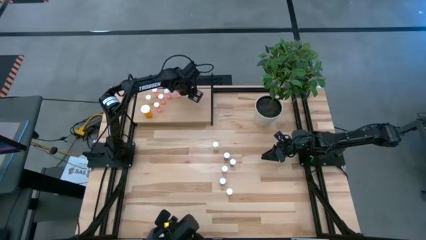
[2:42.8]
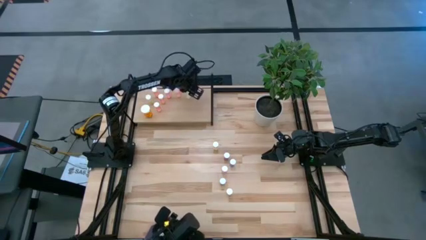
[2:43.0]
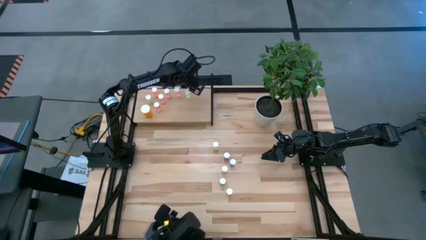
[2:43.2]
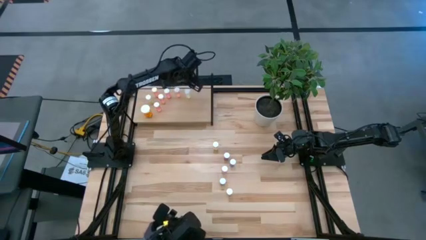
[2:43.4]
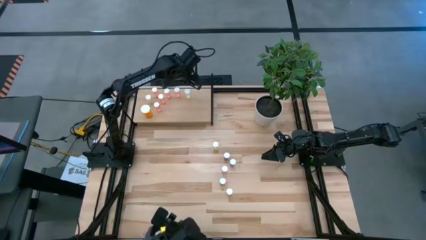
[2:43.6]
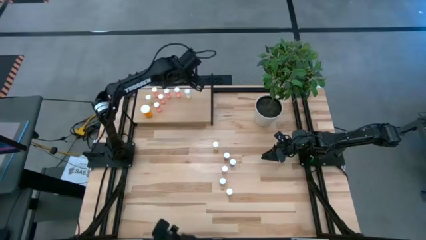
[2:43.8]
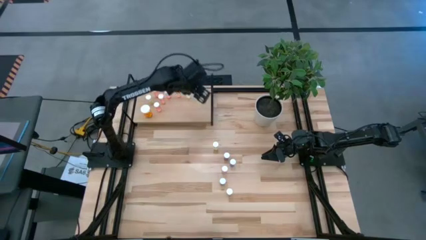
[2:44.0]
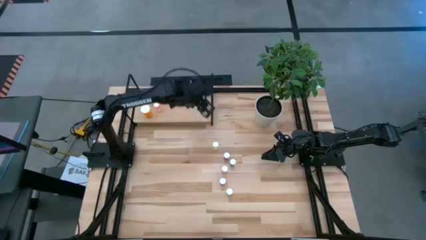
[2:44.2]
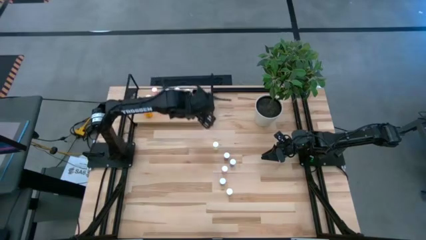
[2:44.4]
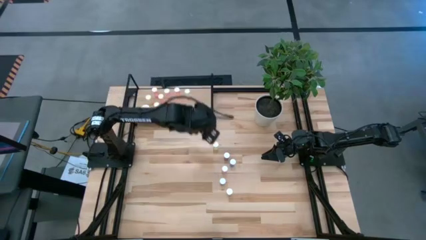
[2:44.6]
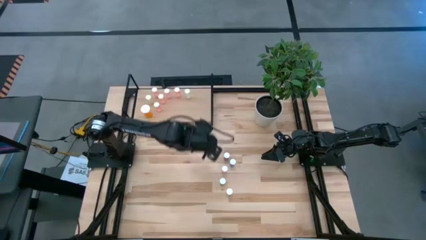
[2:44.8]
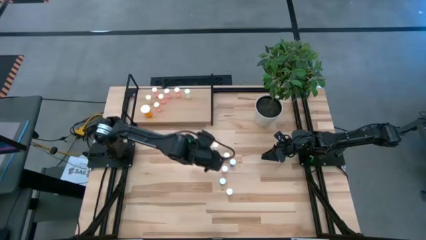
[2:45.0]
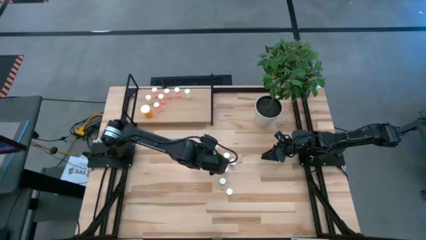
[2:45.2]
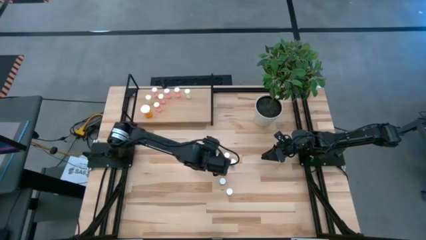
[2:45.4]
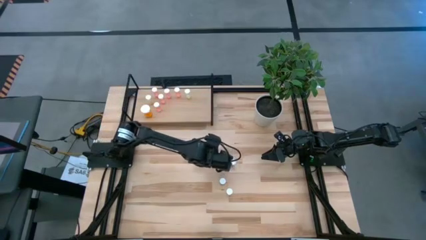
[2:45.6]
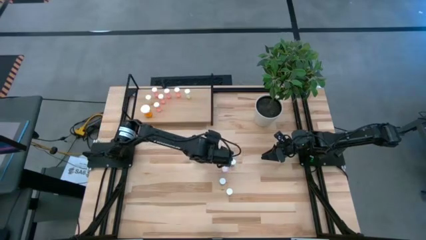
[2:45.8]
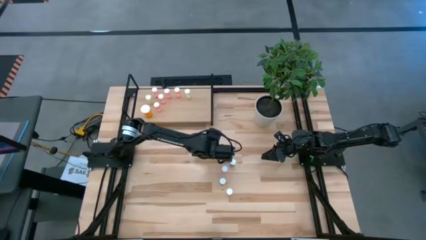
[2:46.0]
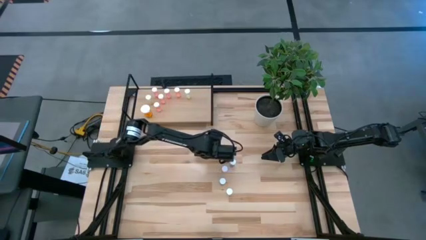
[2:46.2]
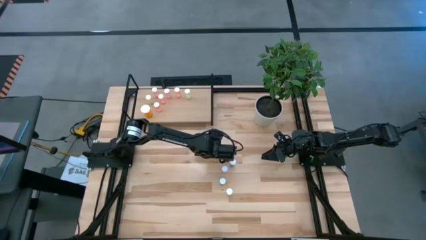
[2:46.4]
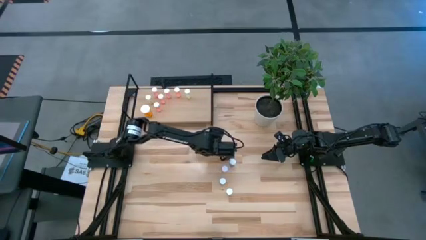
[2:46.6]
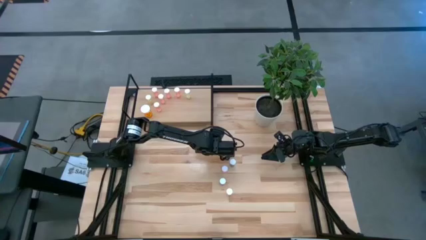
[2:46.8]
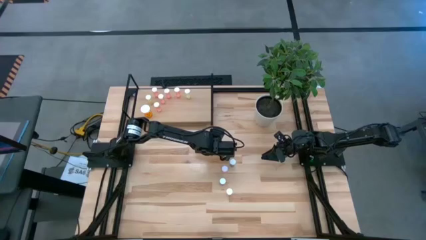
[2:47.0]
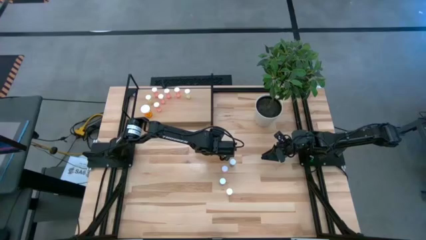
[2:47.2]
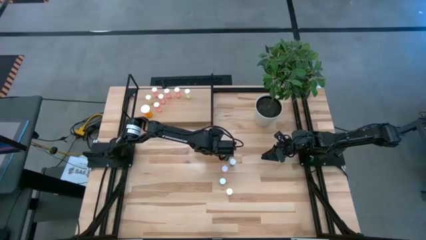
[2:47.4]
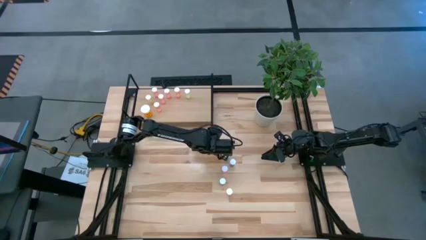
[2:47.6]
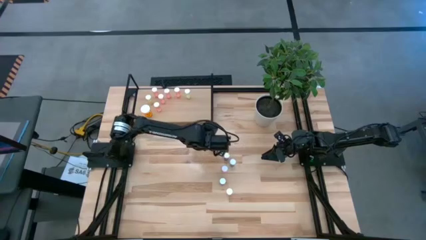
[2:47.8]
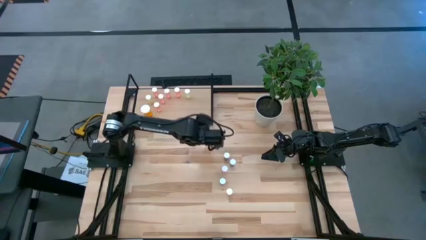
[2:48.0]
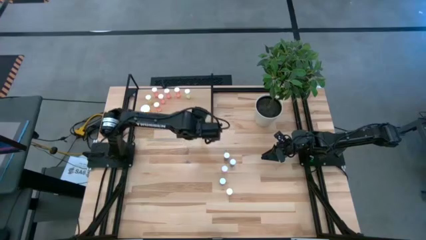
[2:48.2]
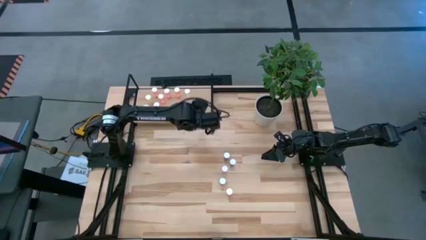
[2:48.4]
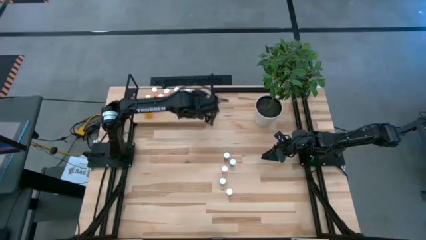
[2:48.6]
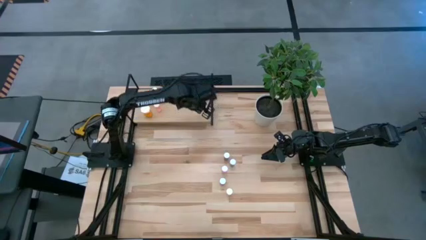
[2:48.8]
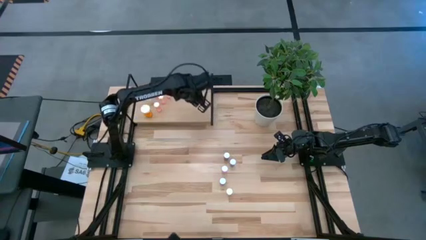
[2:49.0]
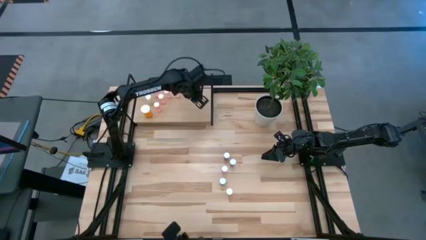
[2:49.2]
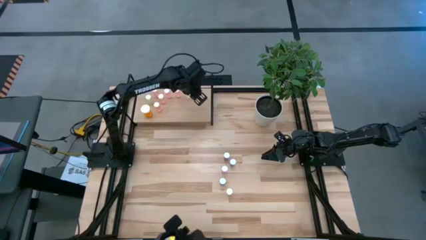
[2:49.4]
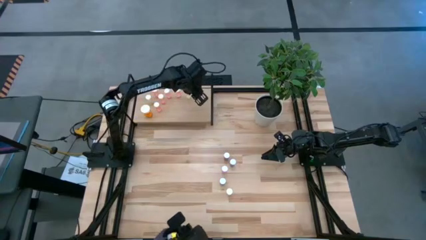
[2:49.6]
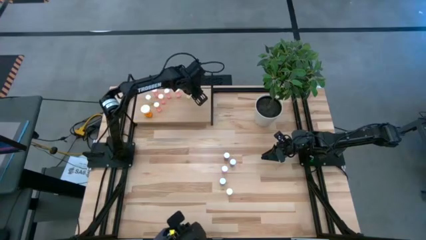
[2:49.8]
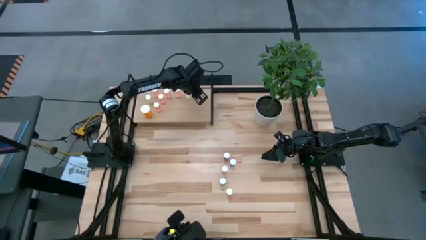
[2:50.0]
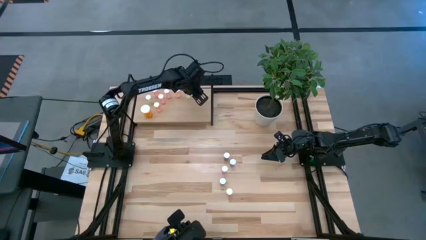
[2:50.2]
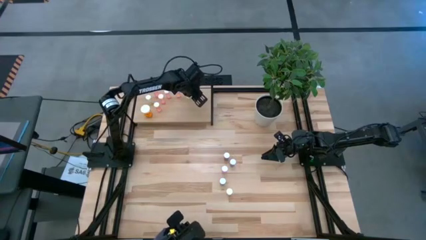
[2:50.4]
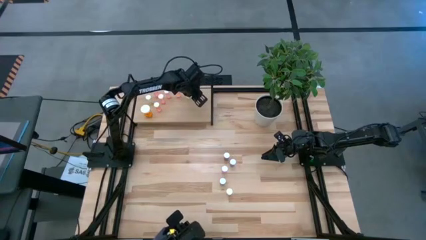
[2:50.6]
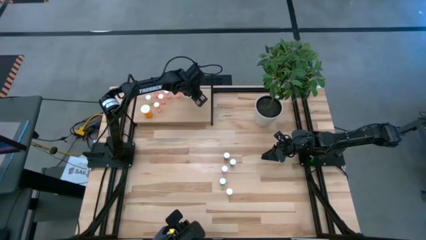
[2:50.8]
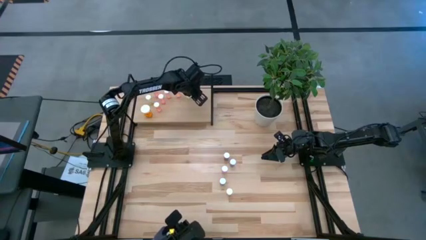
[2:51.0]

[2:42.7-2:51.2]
Task: Pick and place medicine bottles onto shelf by color
Put the yellow pill bottle on the shelf

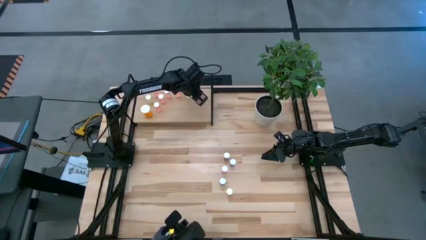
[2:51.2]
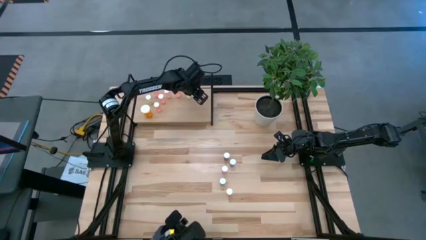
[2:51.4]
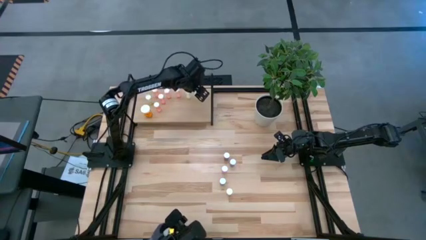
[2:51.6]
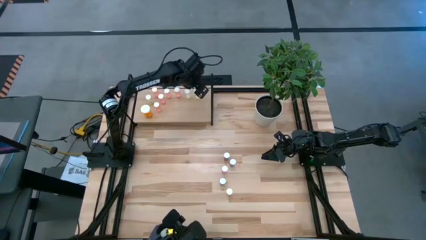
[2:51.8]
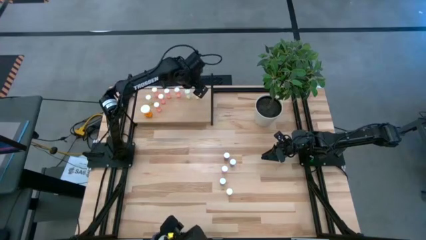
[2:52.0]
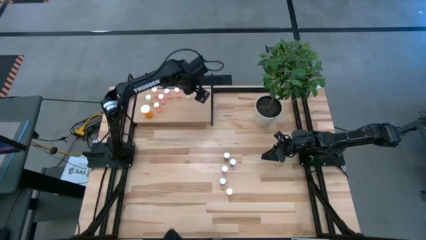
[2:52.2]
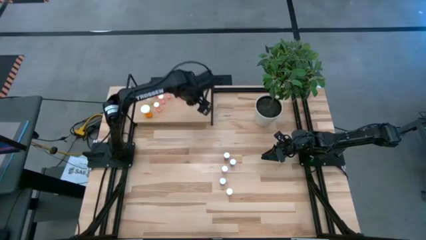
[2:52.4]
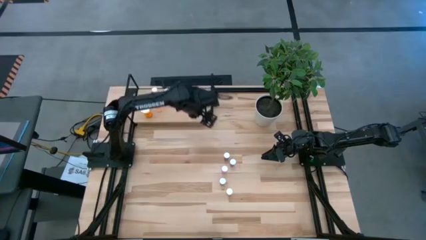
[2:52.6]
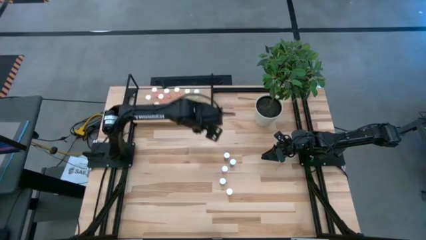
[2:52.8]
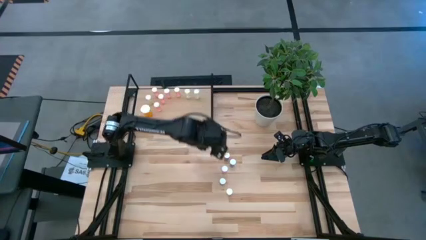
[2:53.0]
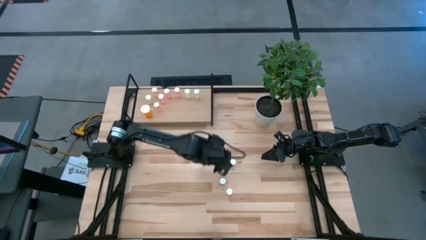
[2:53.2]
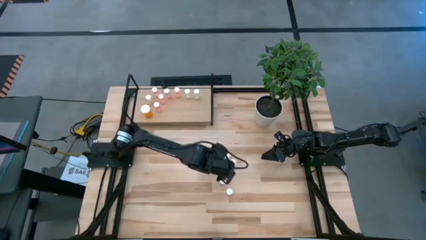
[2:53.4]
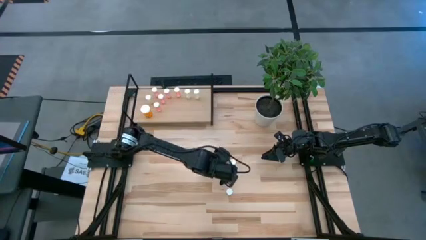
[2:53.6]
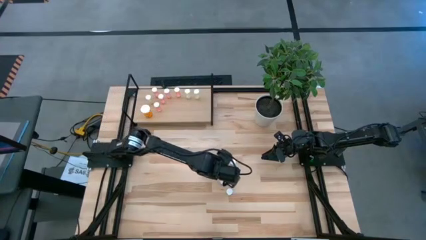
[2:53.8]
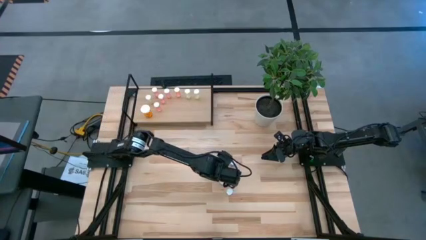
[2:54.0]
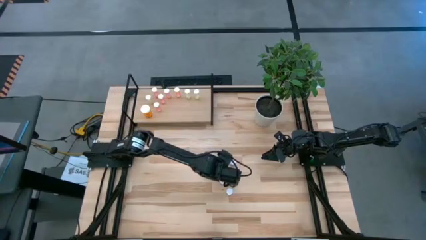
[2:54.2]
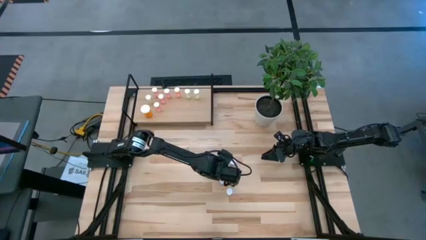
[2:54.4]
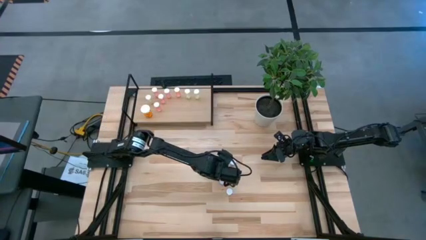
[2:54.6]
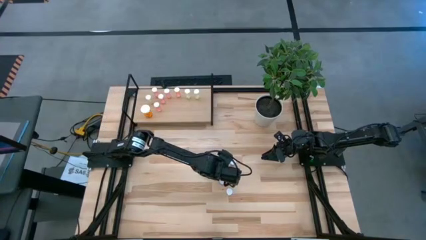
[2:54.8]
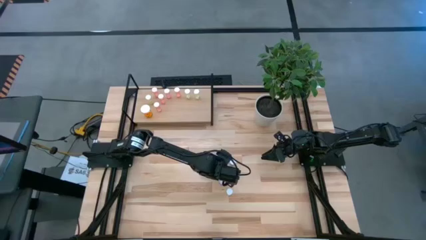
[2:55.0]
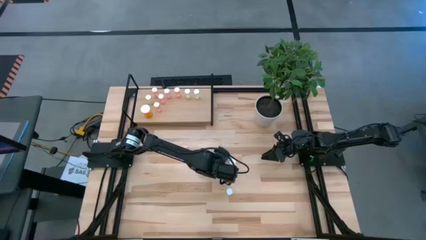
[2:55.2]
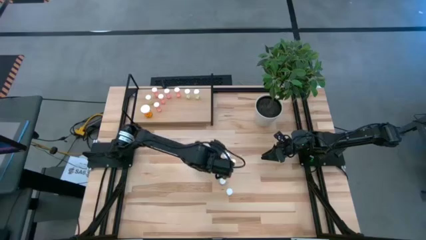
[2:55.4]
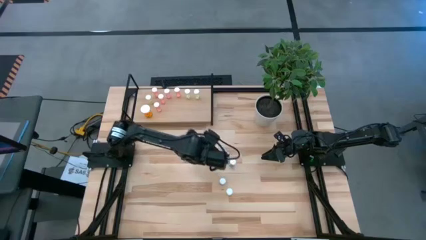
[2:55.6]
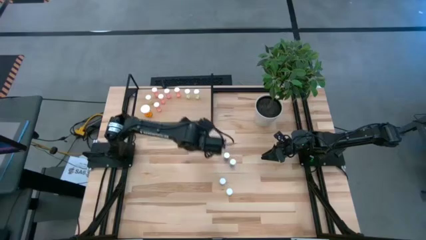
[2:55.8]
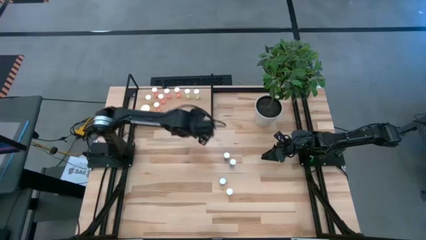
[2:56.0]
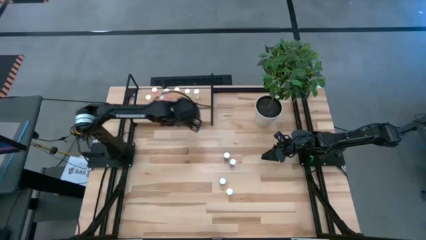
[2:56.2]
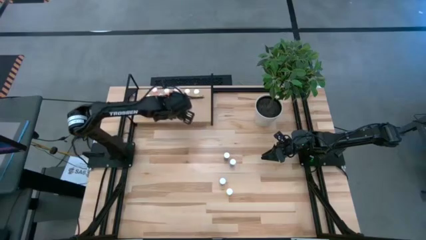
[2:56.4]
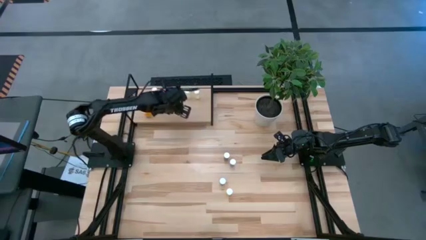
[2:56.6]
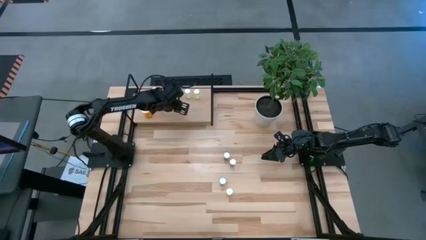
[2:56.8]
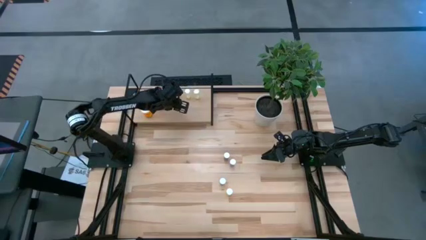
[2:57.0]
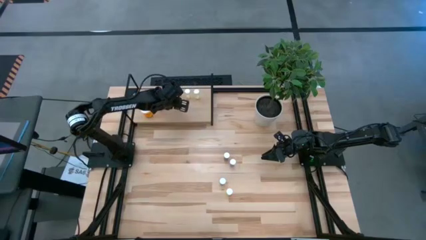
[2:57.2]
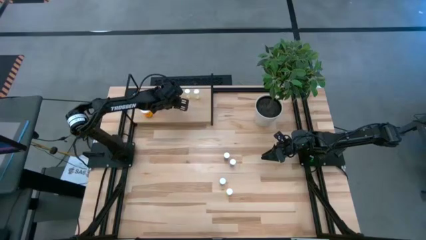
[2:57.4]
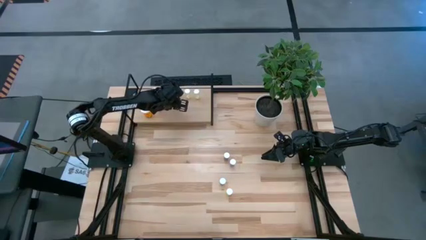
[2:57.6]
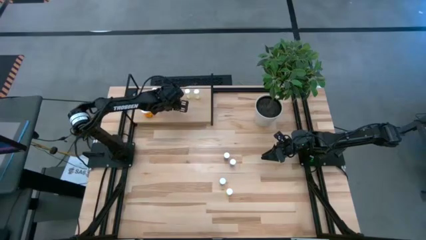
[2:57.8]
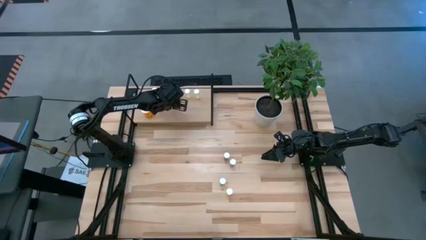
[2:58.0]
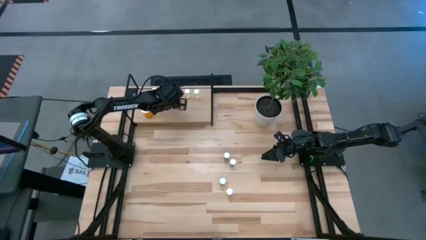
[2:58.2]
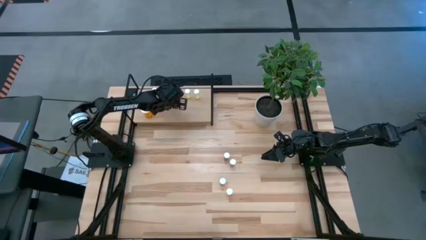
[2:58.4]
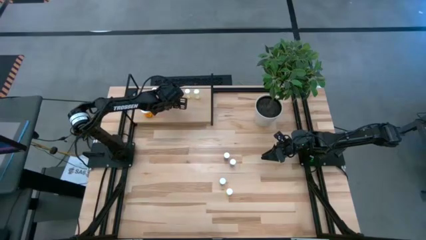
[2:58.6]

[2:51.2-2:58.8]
Put the pink pill bottle on the shelf
